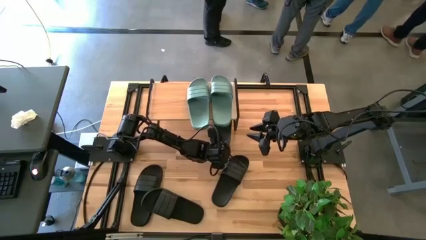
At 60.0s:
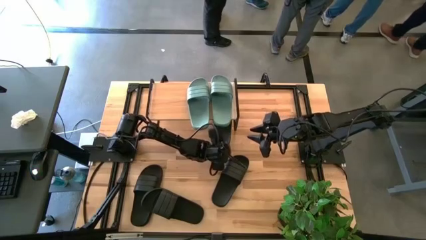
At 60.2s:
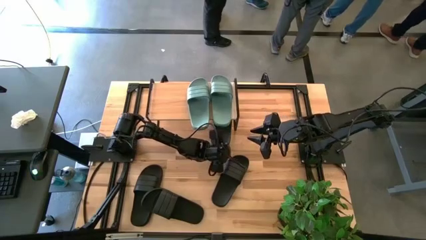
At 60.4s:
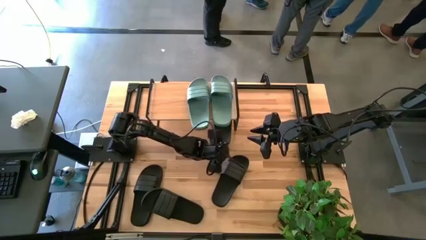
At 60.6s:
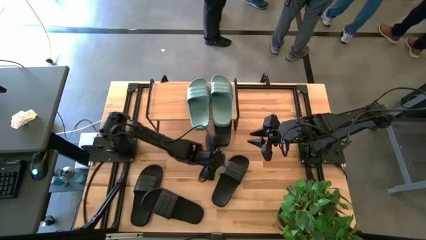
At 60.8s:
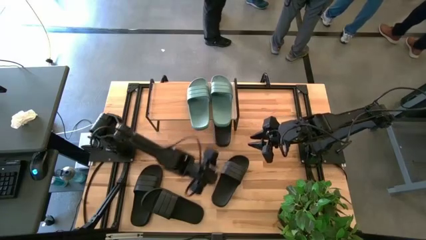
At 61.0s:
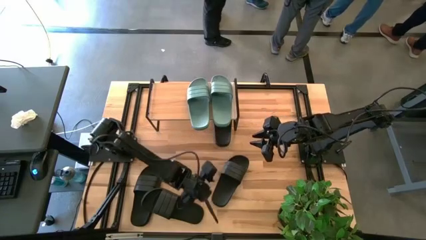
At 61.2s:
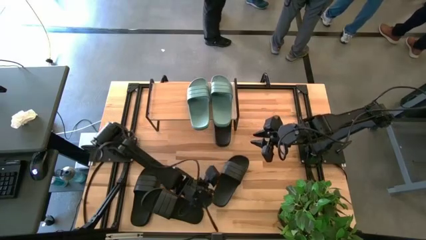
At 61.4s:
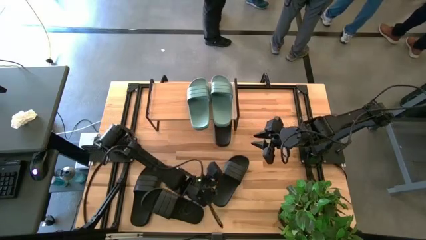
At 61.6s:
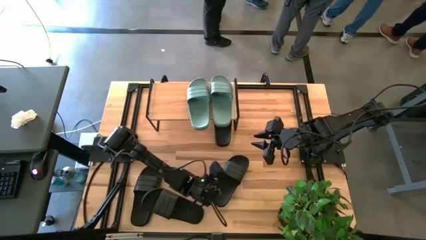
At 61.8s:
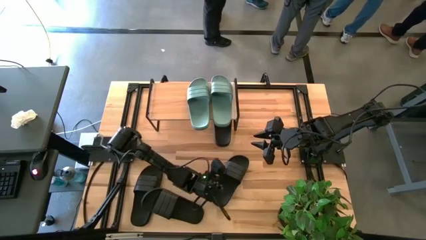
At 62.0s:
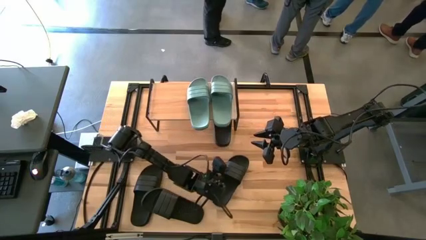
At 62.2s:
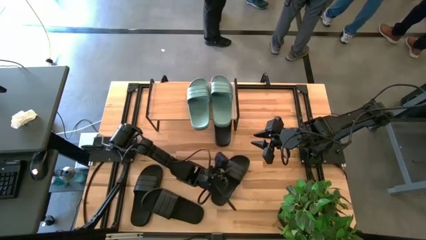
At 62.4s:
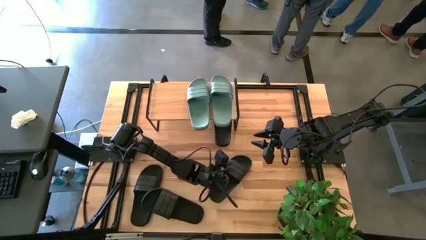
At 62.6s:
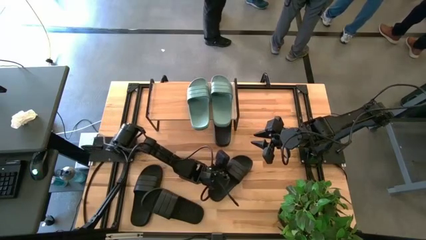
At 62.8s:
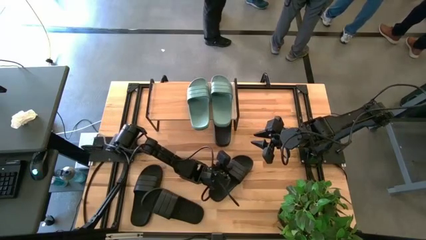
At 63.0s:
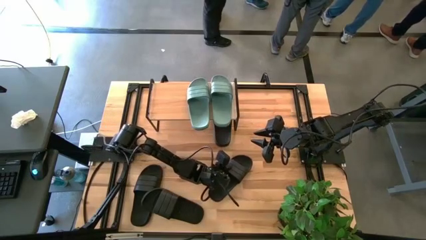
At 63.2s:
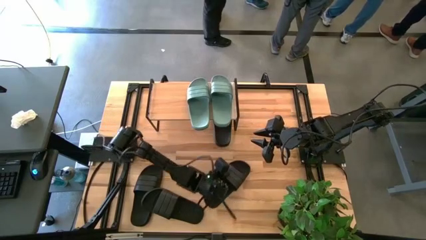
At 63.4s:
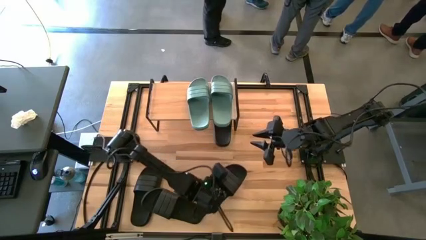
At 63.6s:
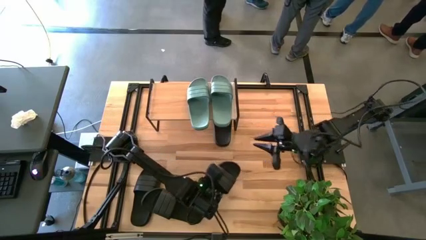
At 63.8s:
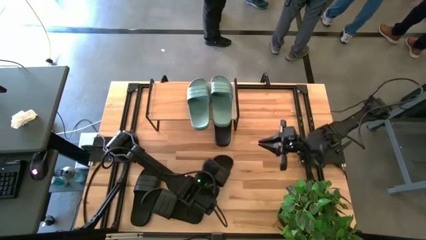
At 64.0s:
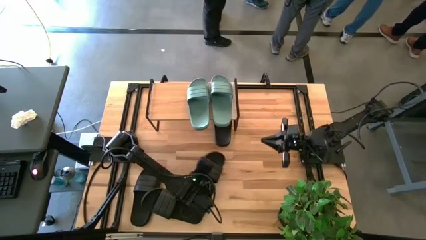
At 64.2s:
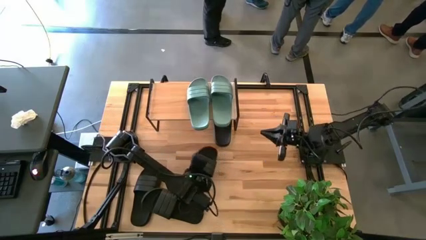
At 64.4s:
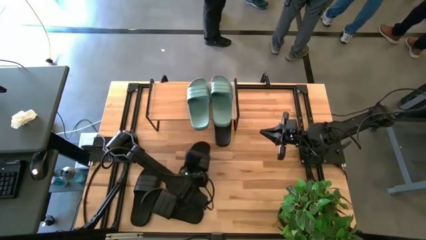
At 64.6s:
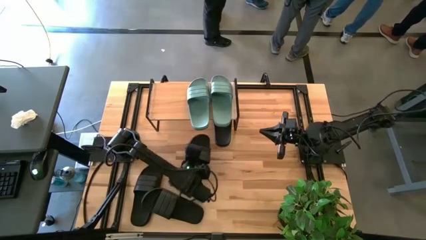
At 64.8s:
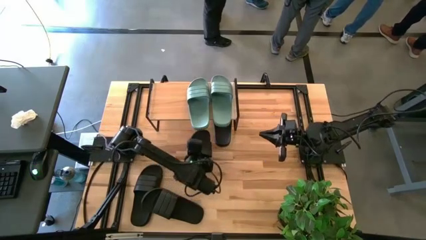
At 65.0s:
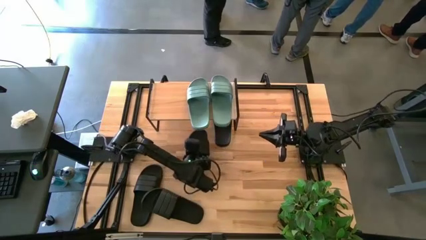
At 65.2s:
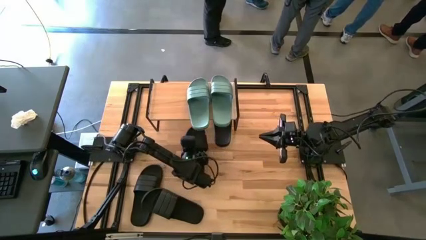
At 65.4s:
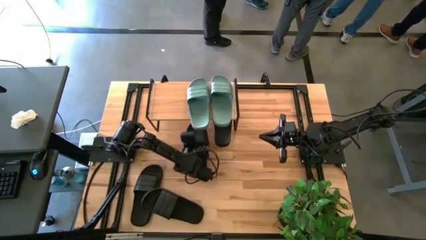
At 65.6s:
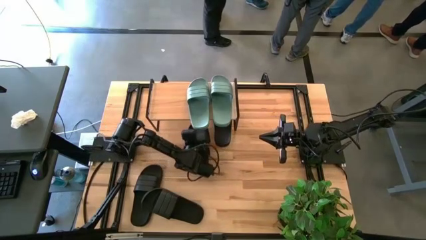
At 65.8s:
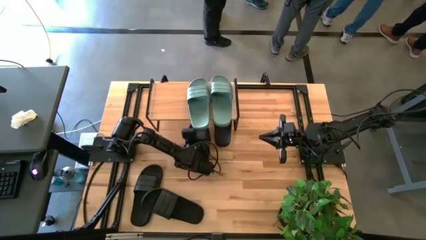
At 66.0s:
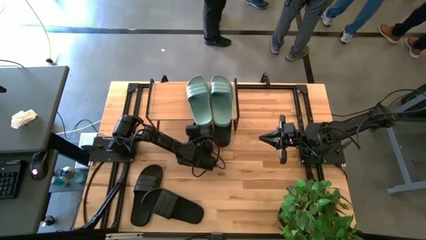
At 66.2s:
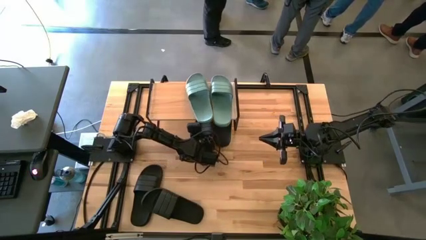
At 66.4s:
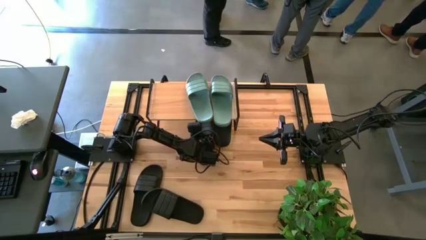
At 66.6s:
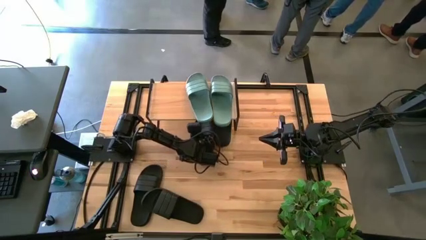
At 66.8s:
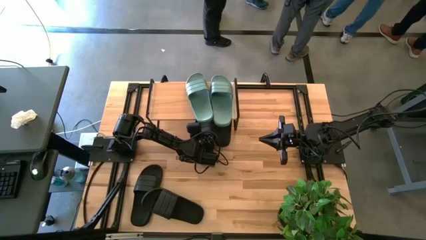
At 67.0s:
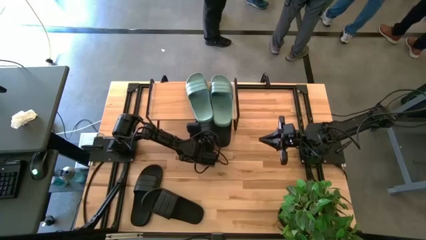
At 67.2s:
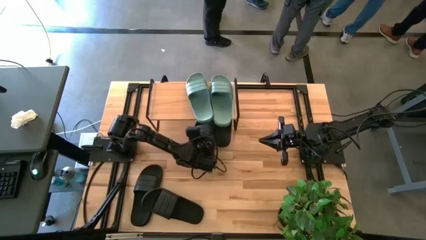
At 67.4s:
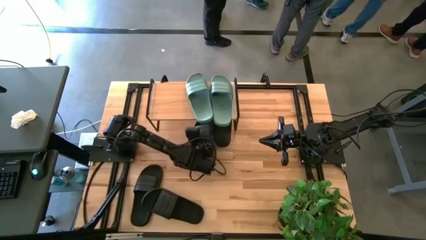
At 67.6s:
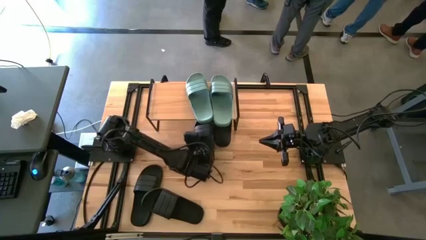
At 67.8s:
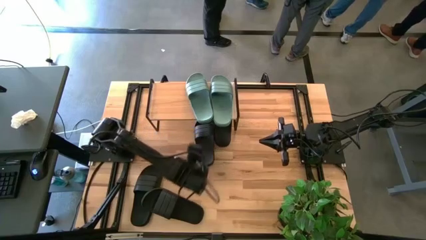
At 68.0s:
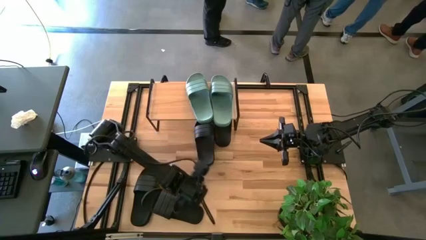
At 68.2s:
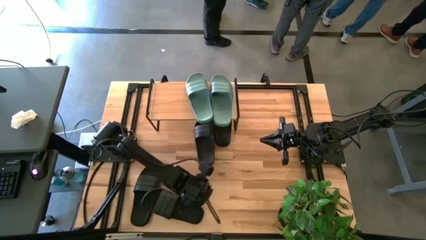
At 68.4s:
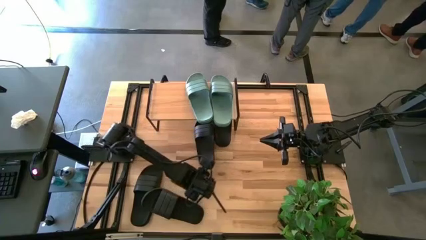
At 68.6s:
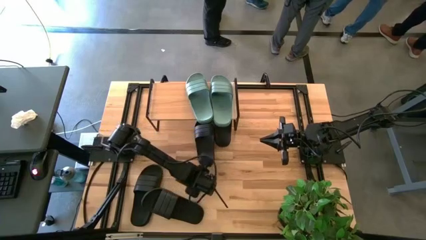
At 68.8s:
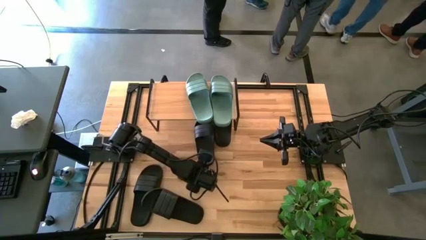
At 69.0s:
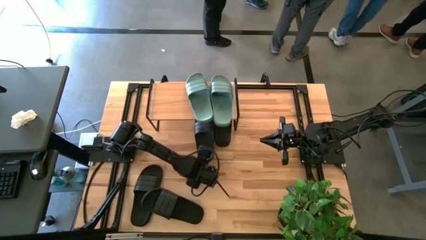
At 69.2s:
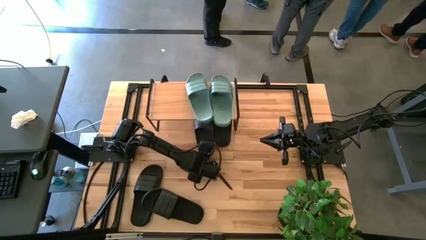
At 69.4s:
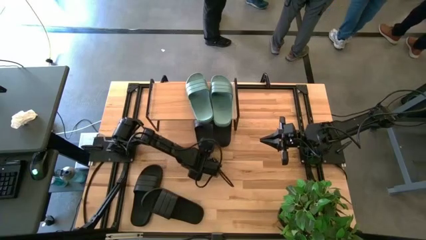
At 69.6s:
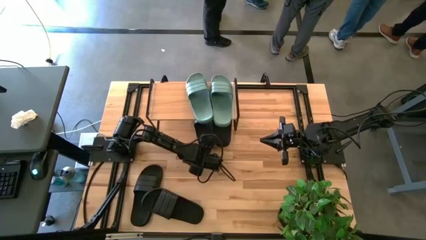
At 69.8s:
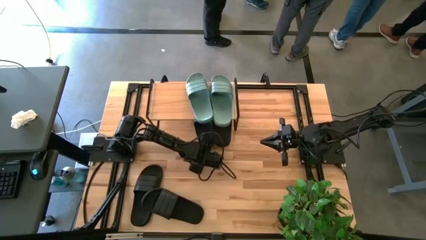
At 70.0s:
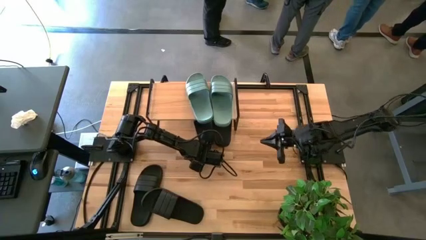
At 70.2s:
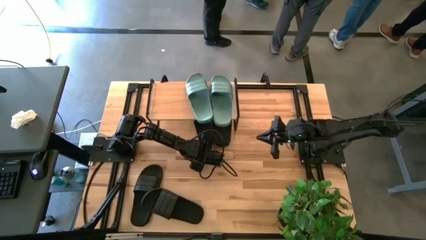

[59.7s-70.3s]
Task: Pick and place slides into the shelf
Put the black slide under the shelf

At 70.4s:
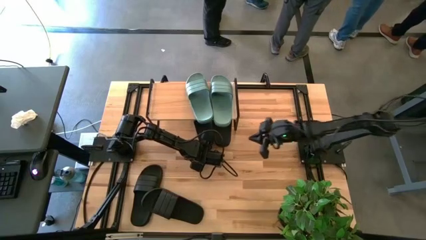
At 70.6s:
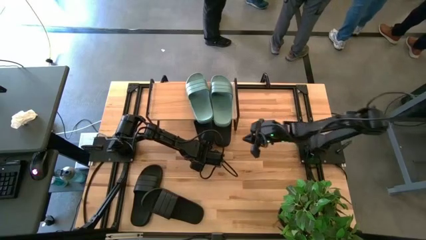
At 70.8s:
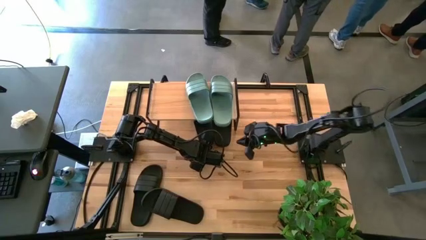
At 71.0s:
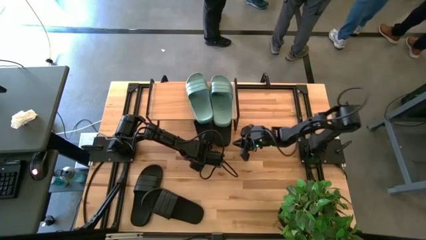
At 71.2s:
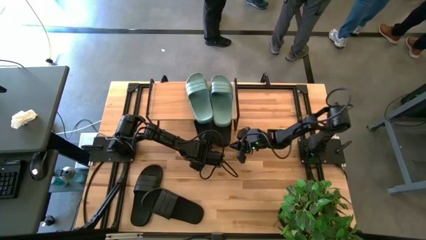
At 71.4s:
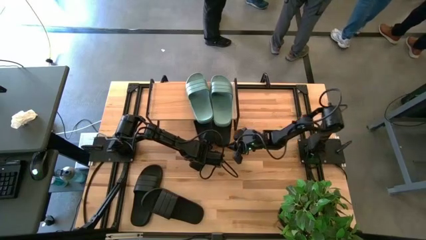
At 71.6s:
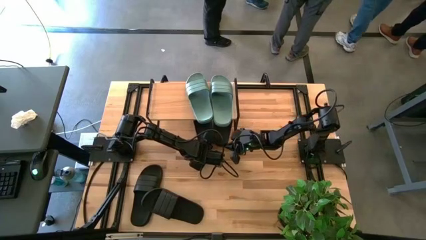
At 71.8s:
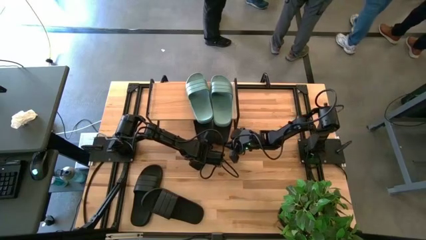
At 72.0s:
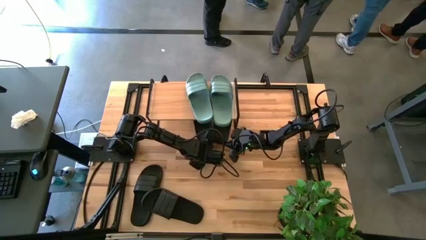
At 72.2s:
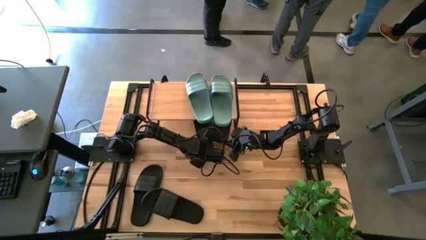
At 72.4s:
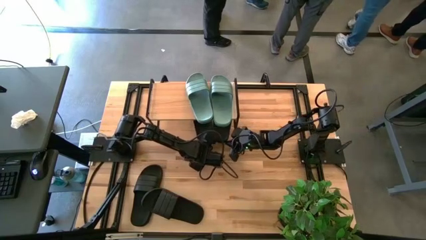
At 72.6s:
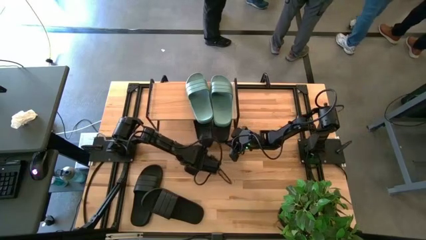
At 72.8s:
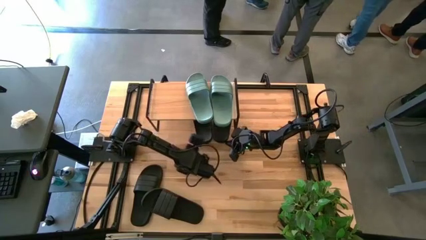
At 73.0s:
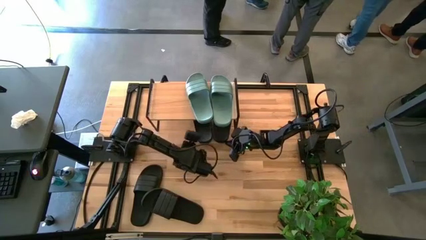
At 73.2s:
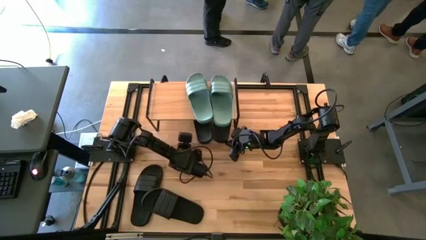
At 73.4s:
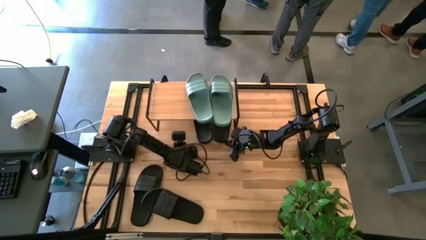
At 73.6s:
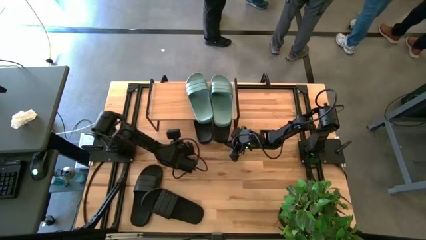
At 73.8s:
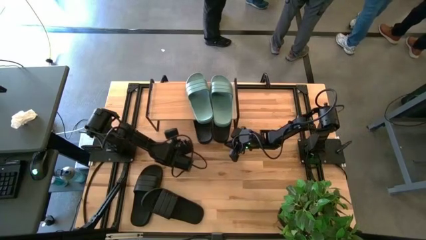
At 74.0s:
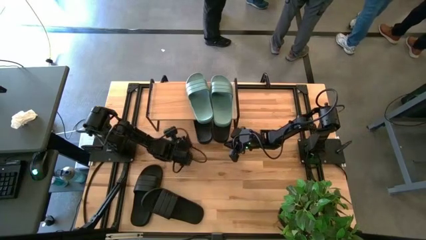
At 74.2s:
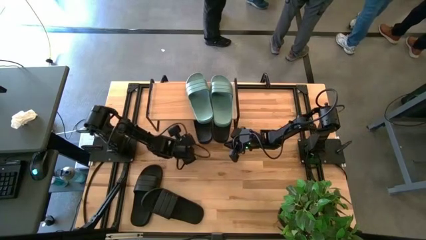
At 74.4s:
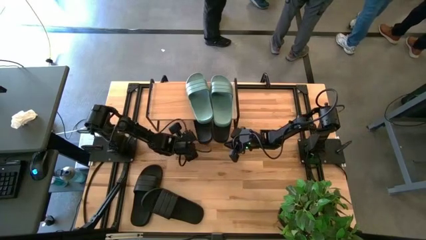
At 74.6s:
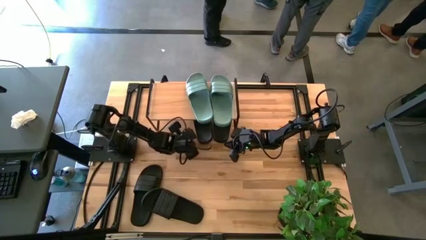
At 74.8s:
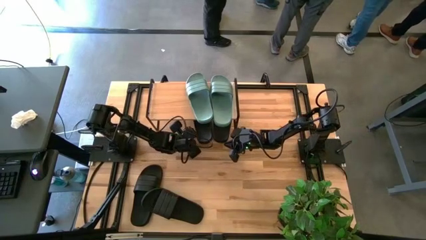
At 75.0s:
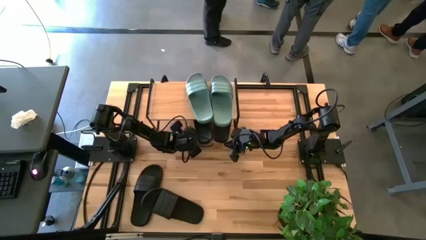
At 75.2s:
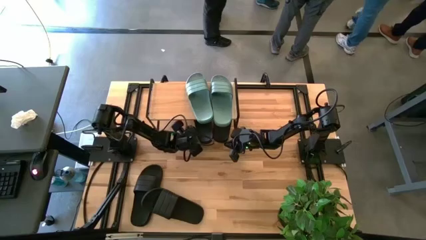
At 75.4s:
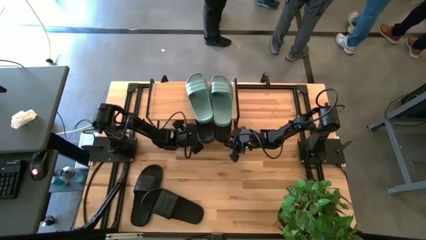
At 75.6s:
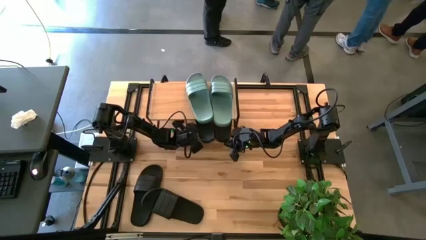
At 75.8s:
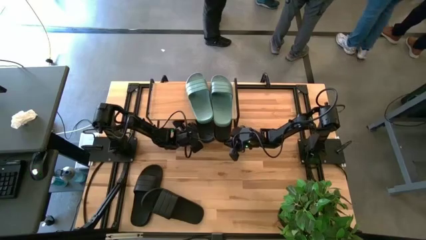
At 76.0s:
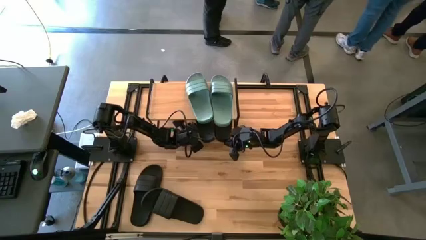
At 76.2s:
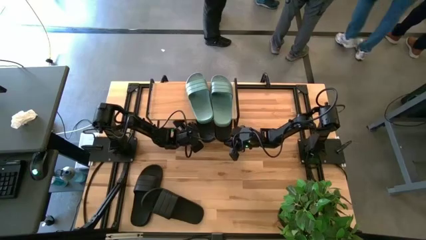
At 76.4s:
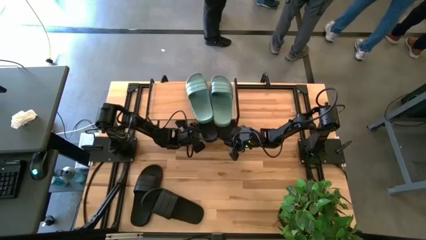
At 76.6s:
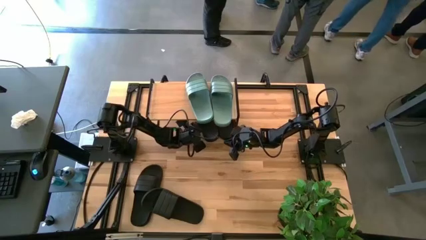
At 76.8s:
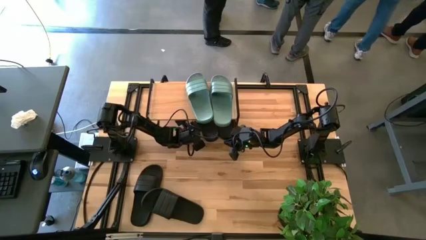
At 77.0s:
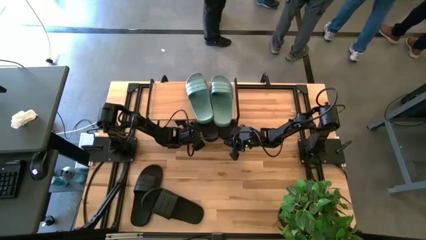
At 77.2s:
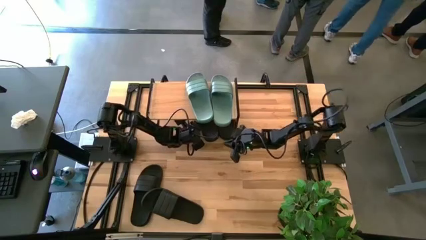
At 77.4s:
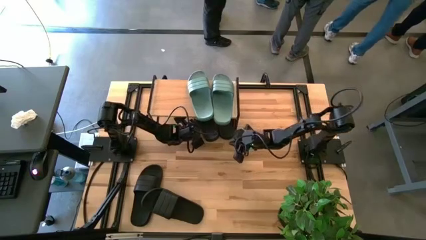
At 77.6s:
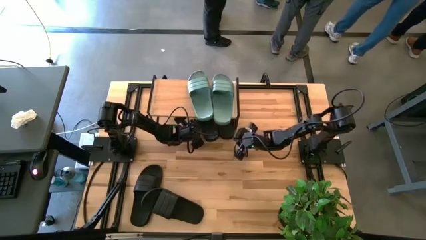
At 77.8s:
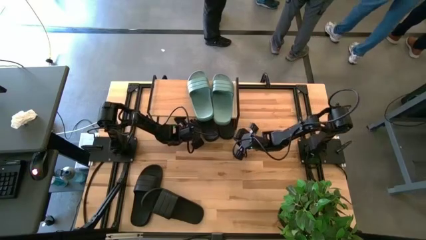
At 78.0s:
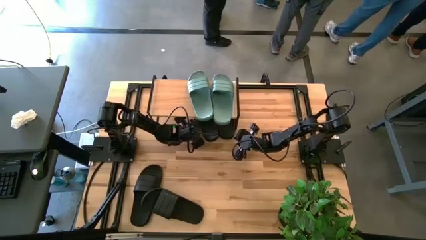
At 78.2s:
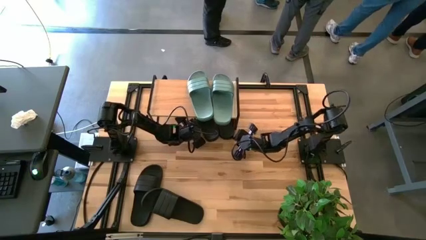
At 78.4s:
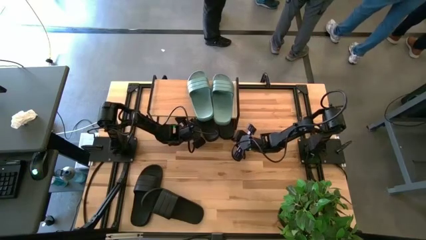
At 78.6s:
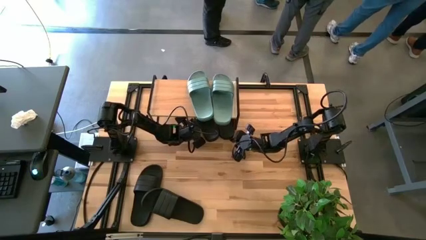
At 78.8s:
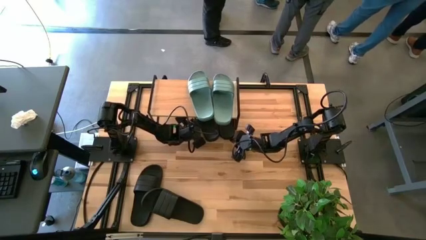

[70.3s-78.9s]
Adjust the black slides under the shelf
